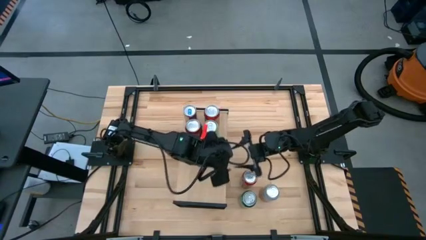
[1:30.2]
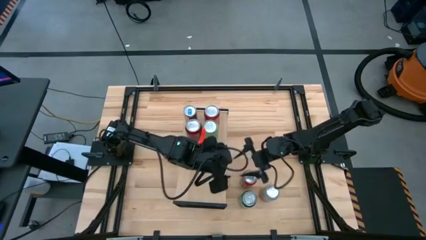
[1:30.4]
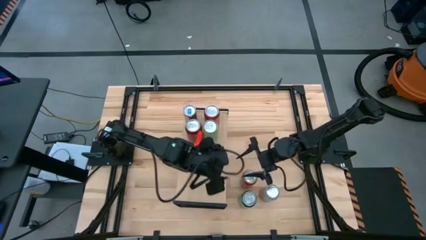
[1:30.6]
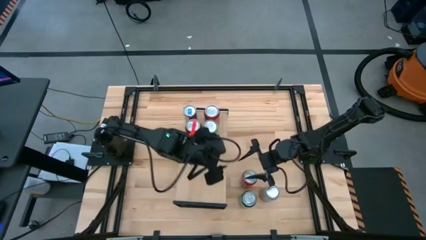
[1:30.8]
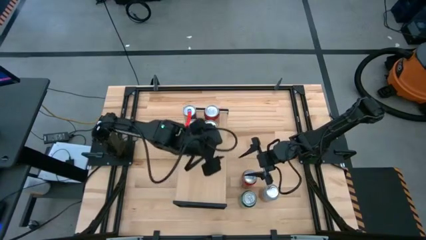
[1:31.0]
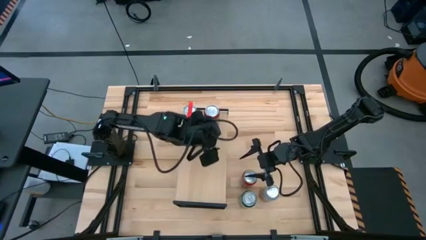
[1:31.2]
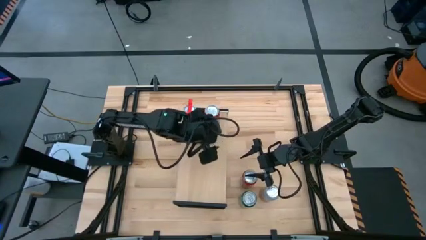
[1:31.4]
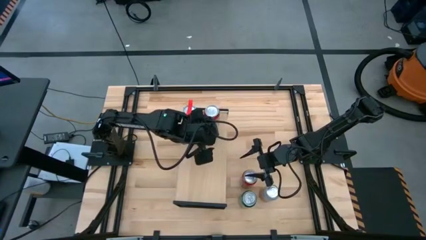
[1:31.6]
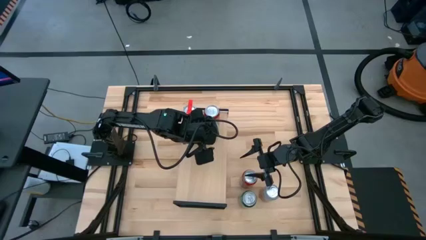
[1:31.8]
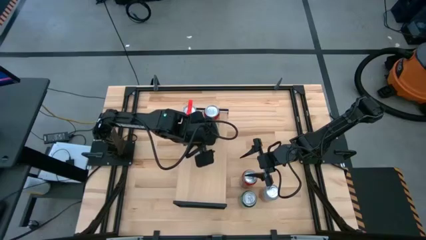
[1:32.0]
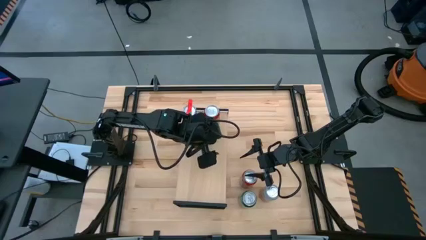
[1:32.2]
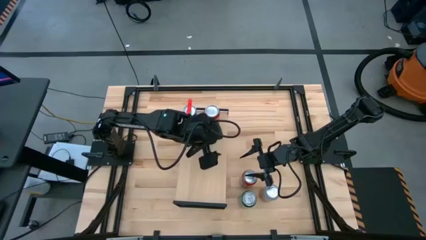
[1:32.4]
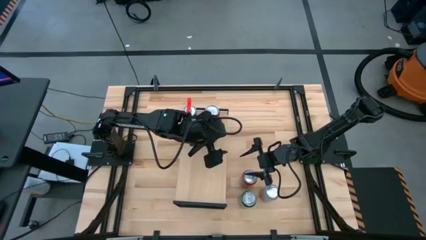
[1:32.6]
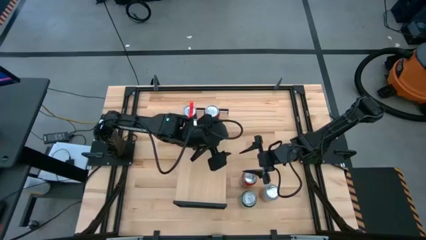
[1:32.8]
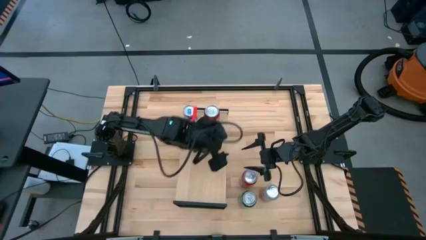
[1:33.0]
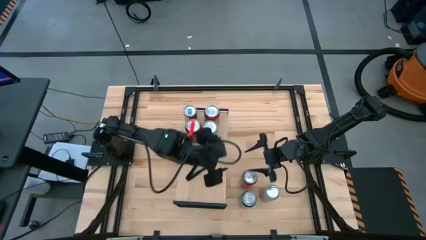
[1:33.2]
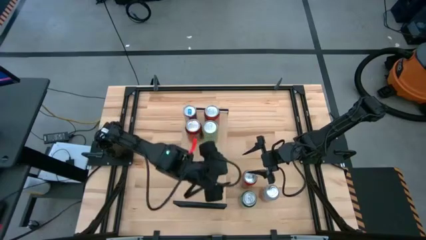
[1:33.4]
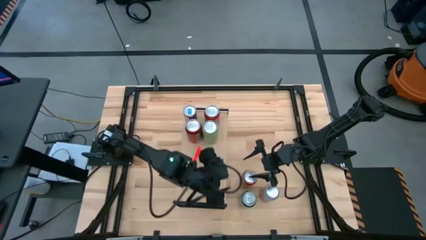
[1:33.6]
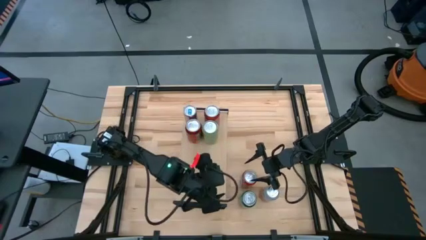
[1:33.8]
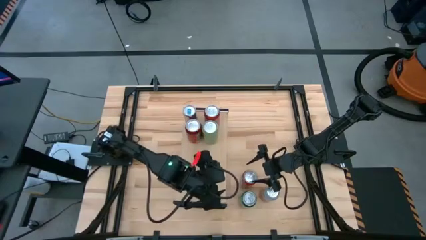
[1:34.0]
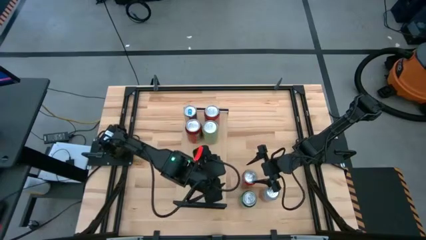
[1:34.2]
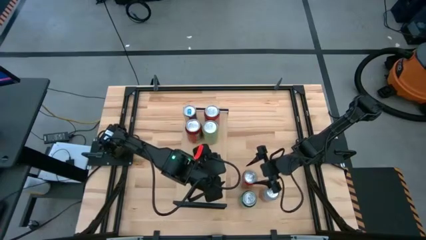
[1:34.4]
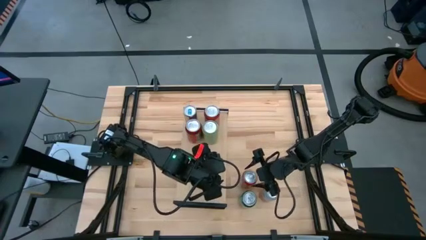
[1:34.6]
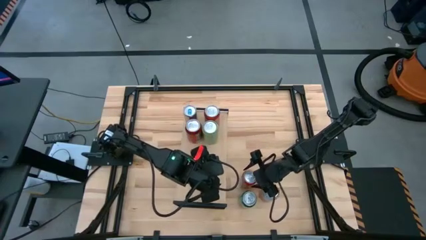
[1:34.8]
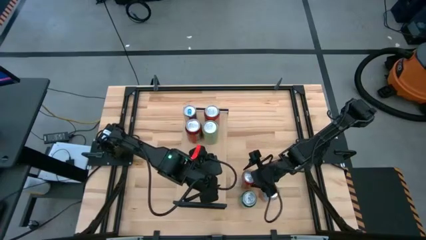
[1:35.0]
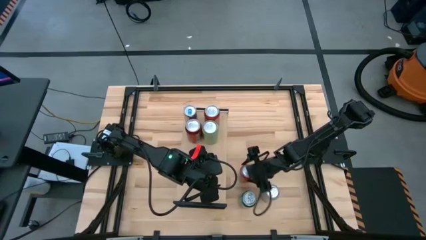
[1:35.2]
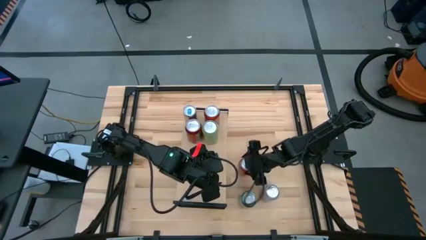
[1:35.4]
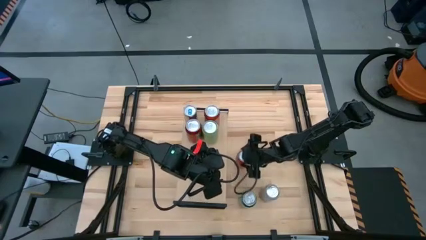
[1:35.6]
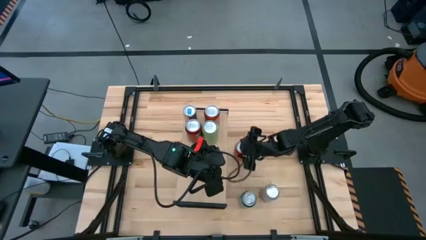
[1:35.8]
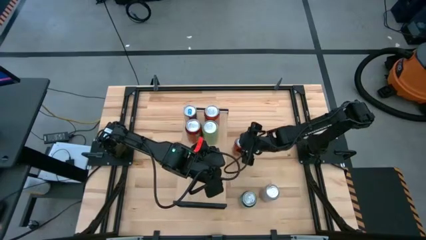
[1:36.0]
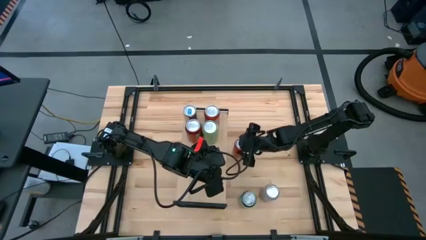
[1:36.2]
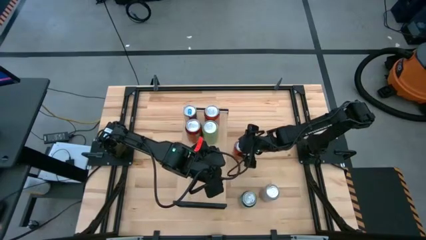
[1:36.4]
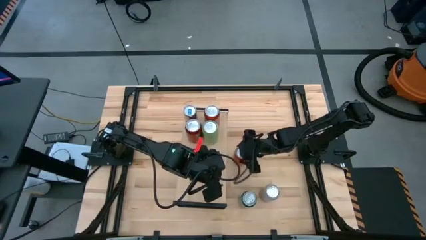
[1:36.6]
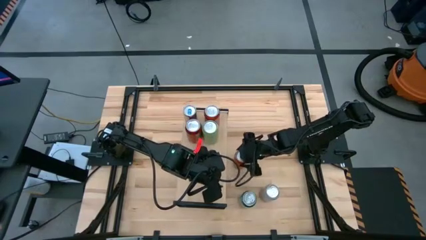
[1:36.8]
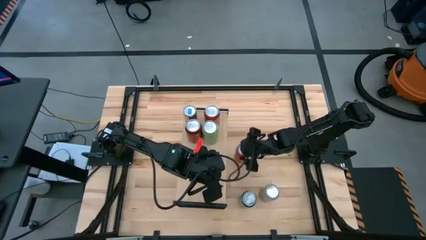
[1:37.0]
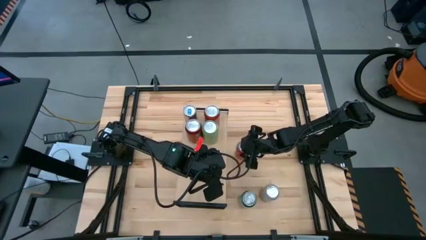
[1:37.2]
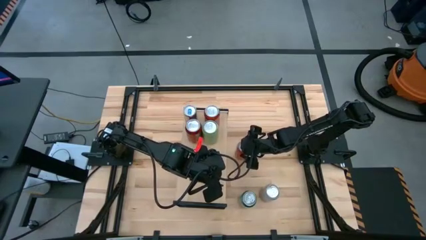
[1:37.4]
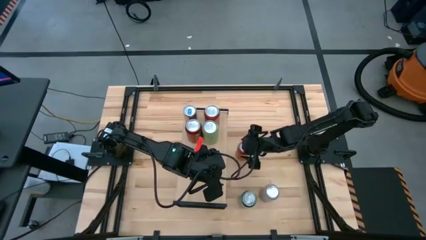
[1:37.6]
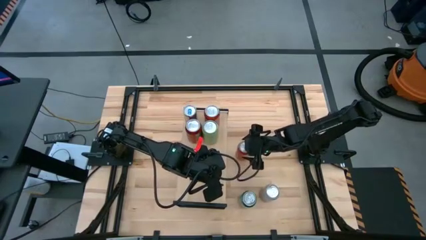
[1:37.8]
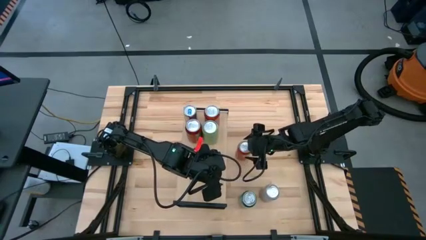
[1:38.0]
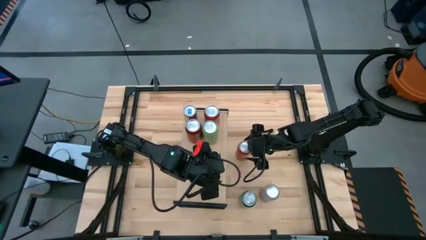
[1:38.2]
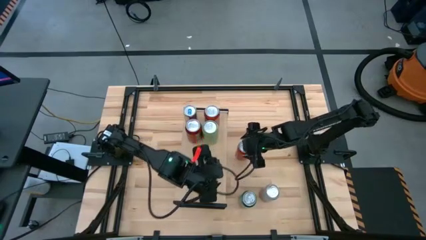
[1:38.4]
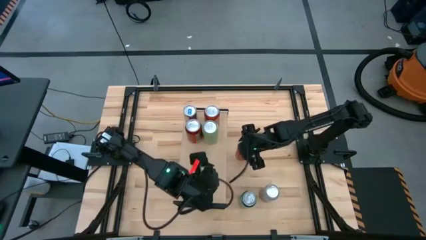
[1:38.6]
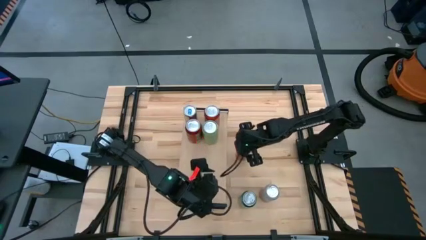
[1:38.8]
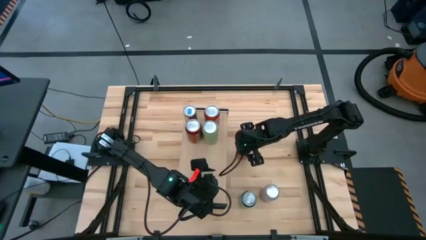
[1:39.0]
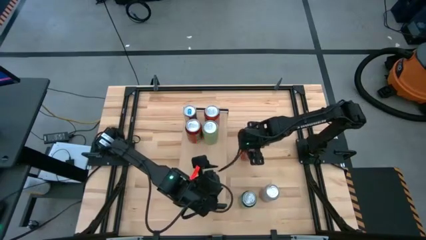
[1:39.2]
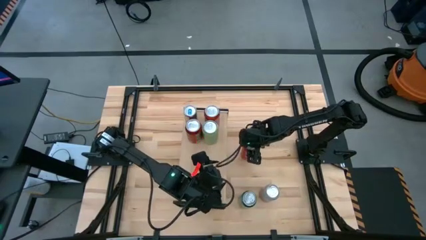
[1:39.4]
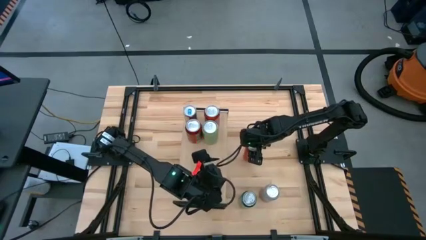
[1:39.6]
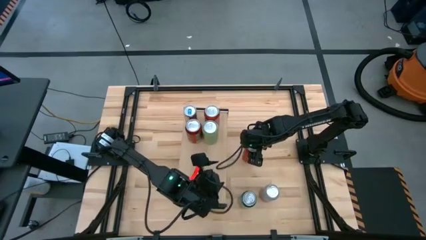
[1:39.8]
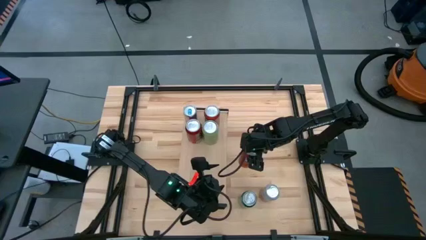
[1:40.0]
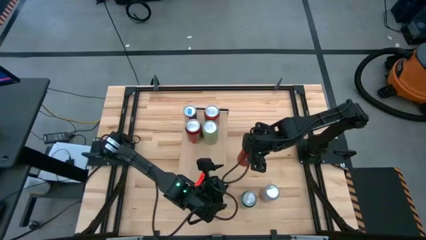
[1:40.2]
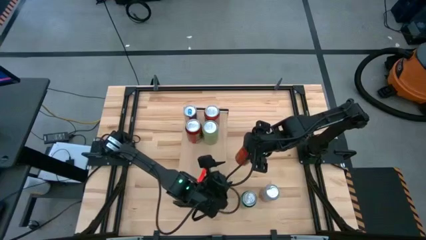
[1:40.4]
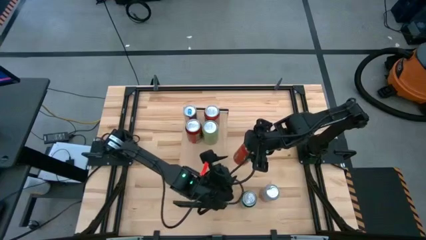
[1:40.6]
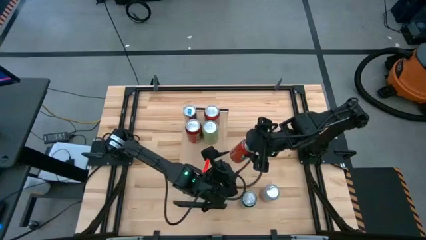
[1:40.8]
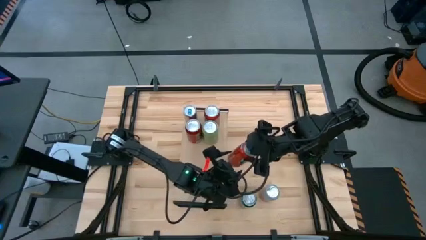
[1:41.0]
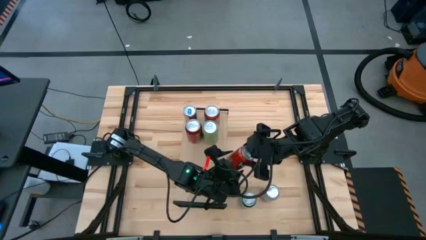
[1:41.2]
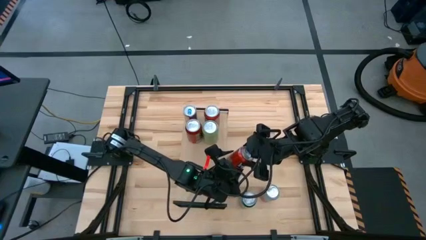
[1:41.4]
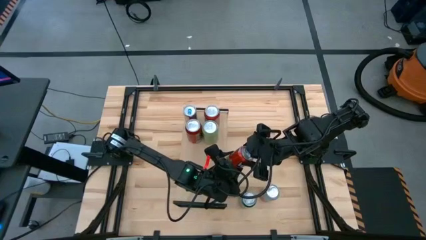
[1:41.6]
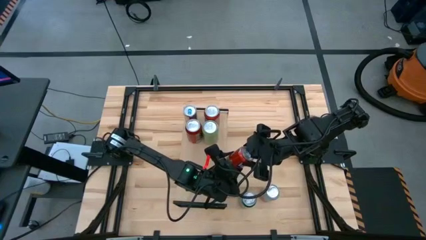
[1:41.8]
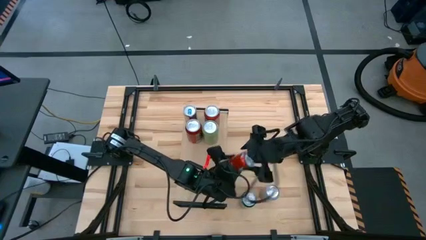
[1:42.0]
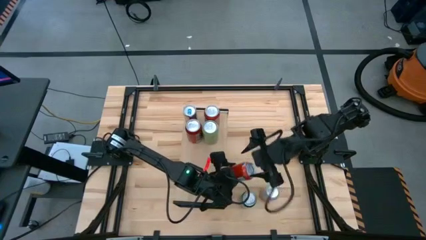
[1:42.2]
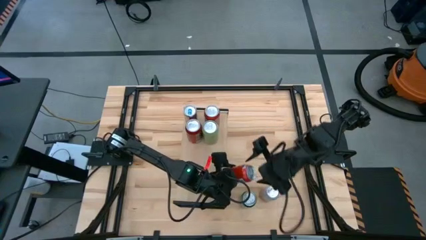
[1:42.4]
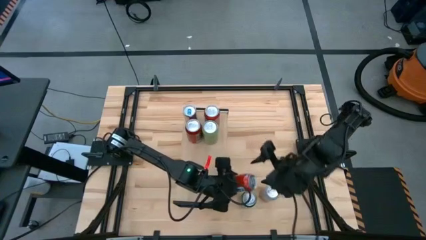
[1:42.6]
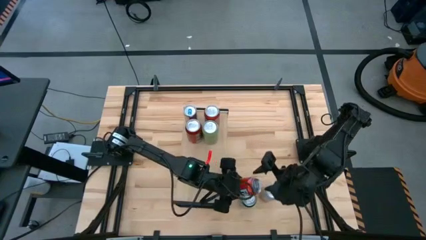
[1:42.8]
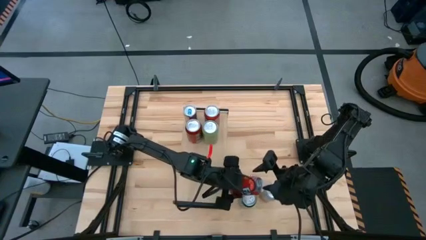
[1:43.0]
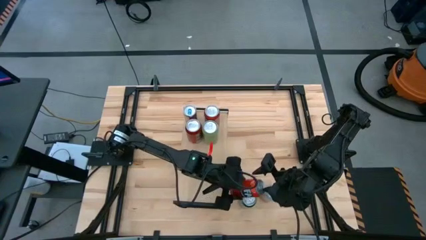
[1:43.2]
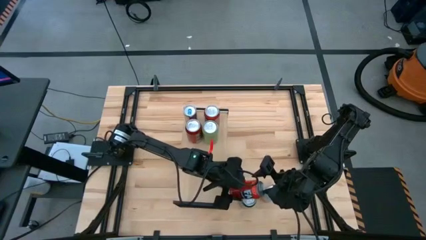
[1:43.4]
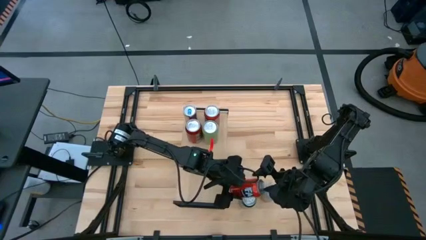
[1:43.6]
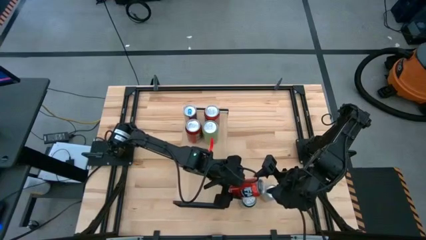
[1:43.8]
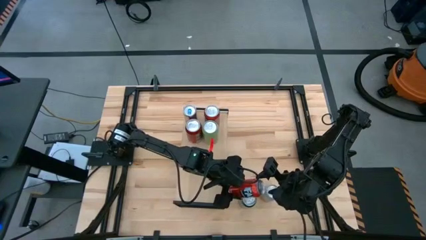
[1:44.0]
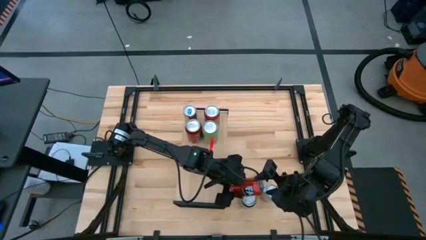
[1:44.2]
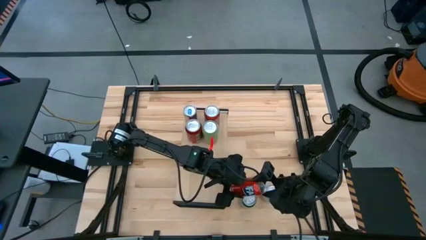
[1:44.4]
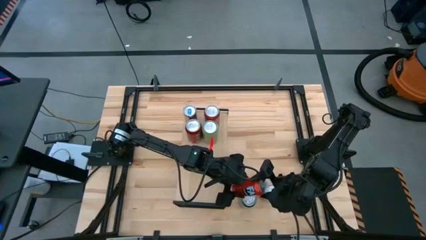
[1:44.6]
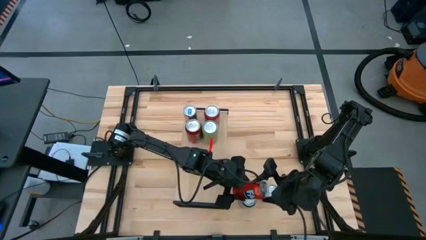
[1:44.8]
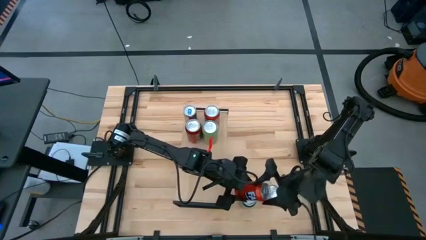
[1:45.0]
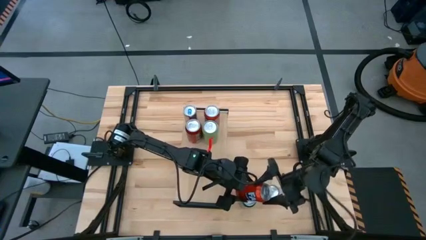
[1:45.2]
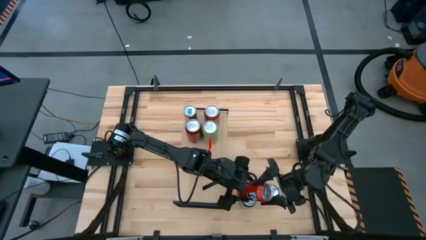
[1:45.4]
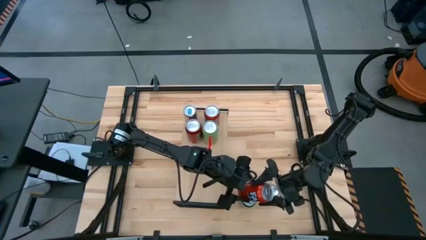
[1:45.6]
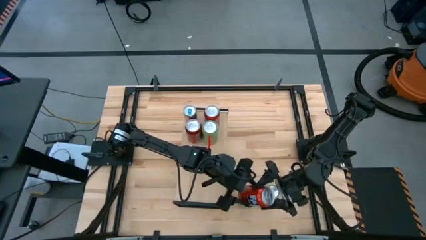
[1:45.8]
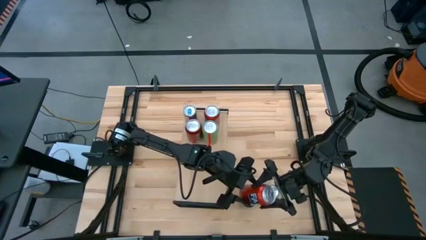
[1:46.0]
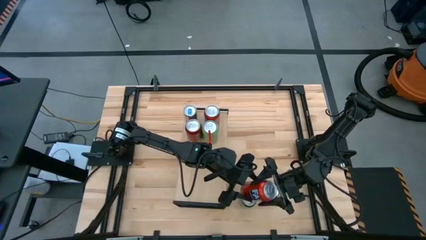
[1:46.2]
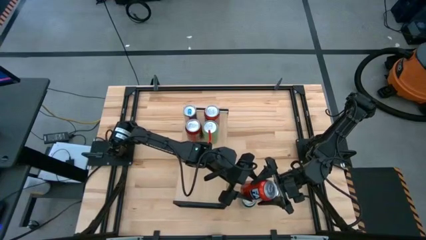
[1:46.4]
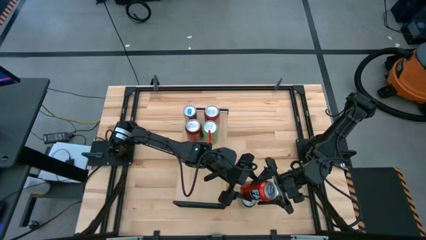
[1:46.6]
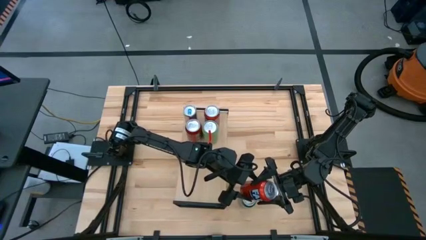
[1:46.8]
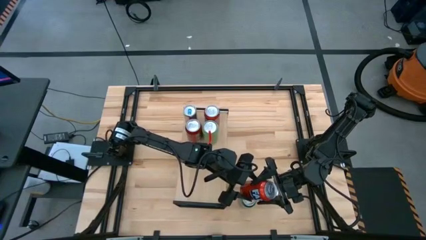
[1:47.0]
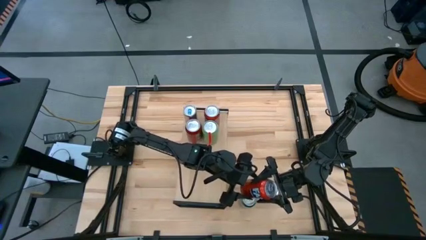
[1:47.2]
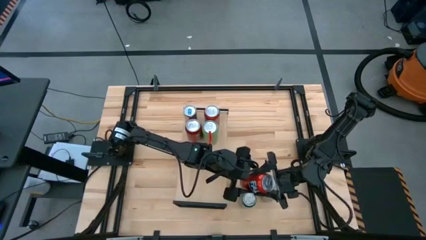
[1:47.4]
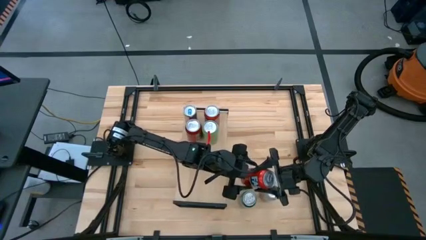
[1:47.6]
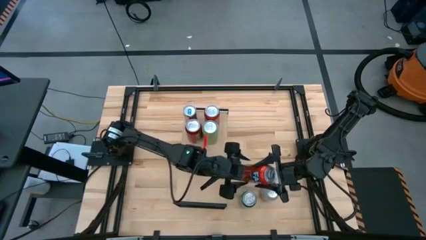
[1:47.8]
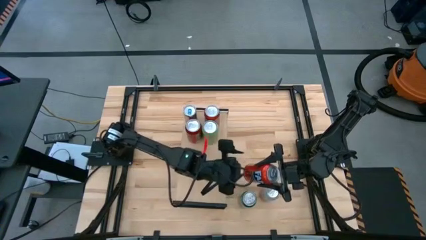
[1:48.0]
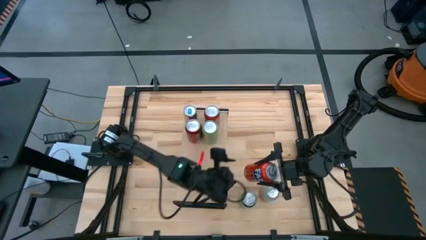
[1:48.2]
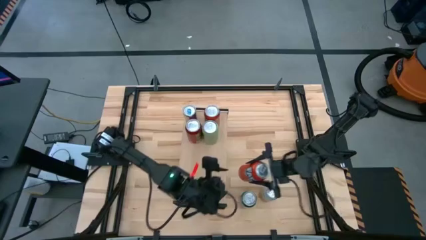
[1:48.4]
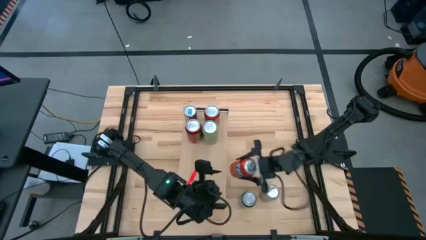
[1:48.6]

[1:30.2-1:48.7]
Task: Place canned beverage on shelf
Put the red soda can on the shelf
